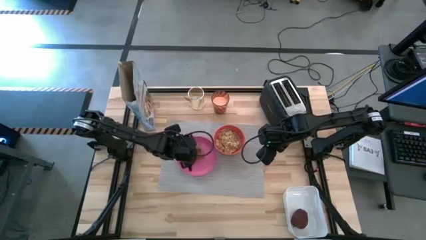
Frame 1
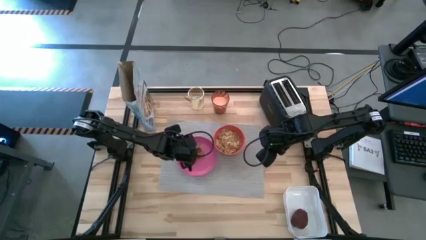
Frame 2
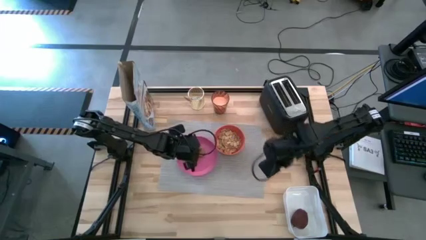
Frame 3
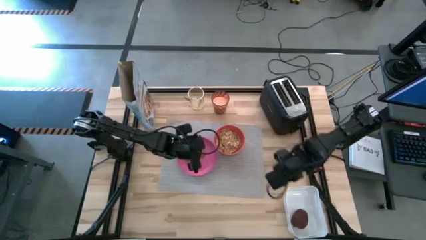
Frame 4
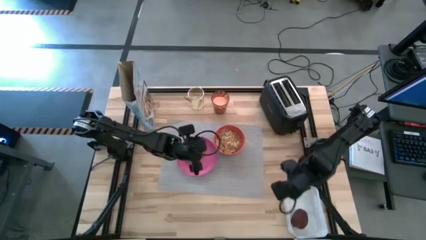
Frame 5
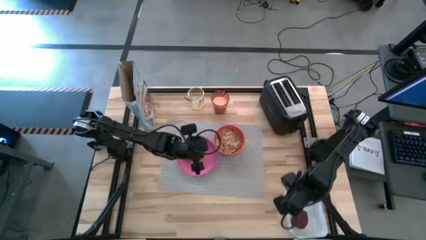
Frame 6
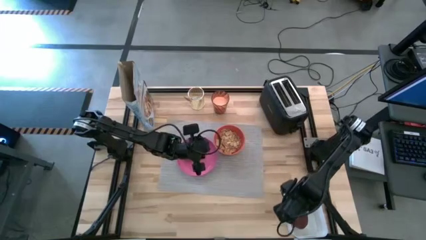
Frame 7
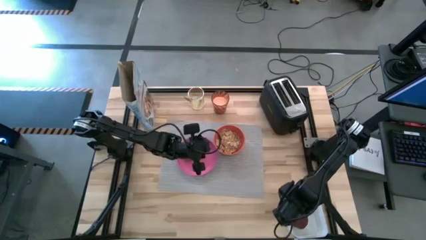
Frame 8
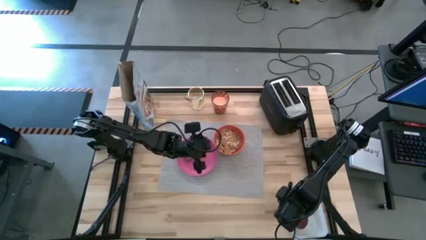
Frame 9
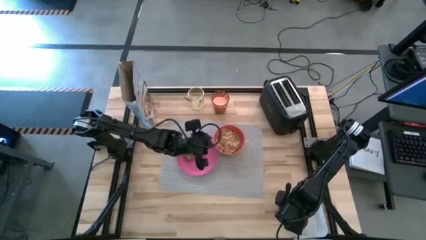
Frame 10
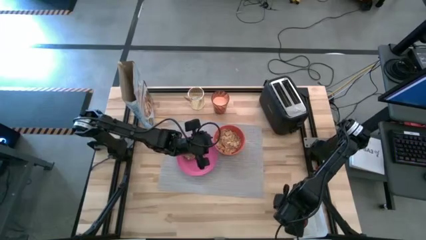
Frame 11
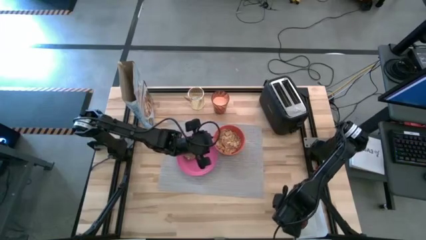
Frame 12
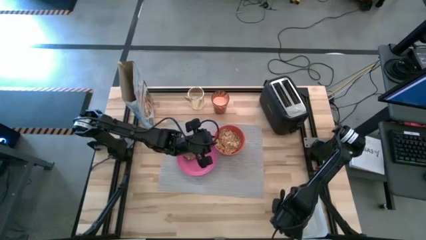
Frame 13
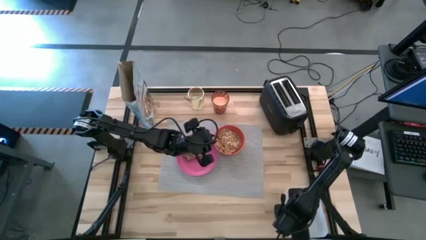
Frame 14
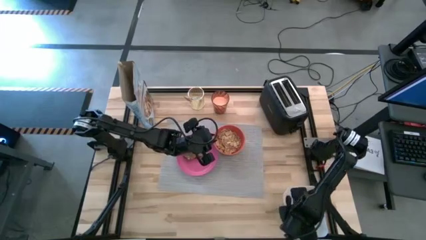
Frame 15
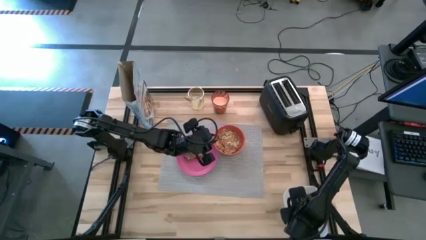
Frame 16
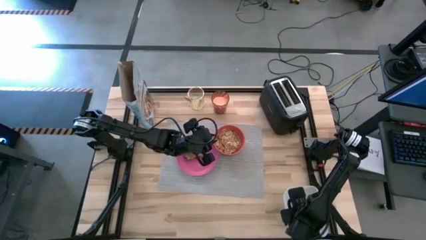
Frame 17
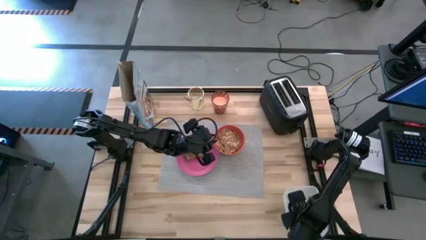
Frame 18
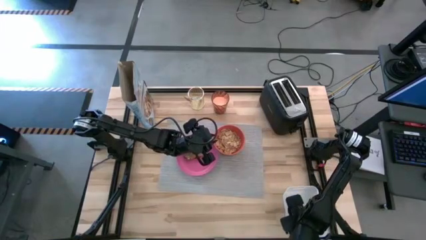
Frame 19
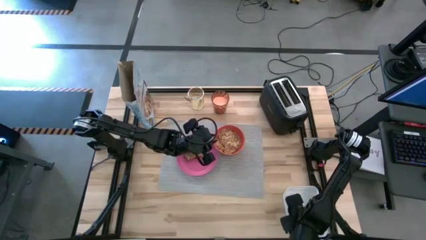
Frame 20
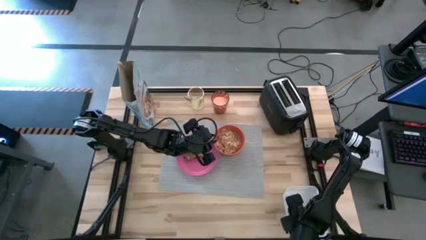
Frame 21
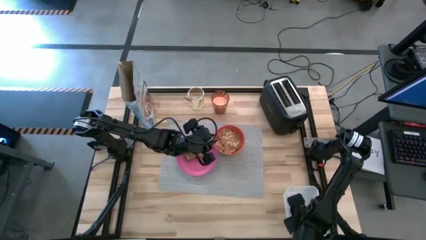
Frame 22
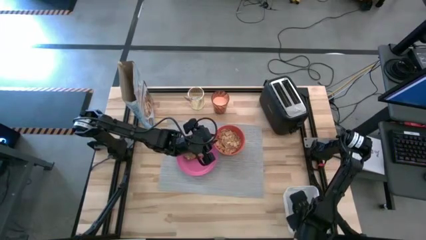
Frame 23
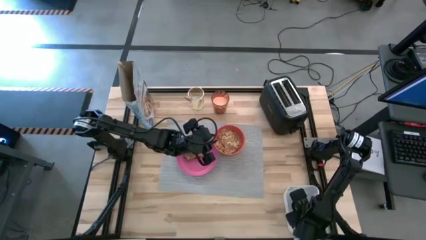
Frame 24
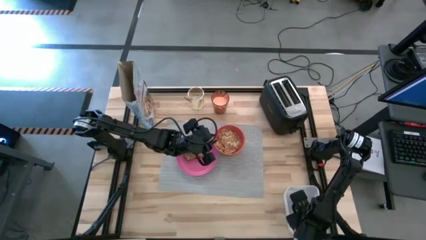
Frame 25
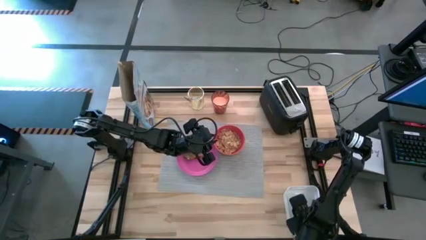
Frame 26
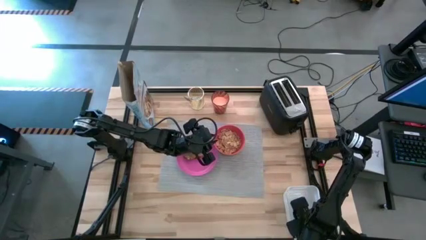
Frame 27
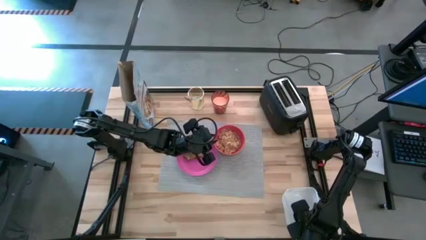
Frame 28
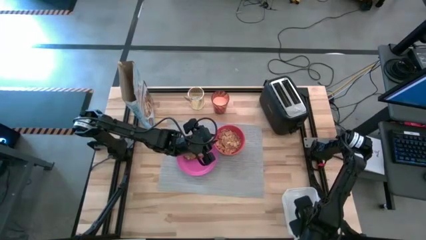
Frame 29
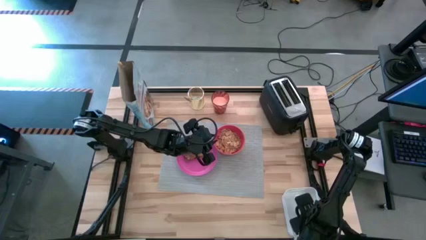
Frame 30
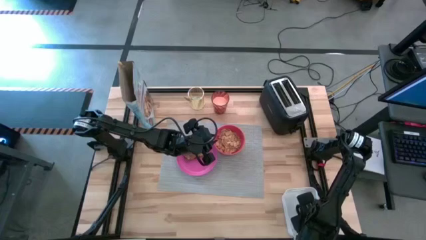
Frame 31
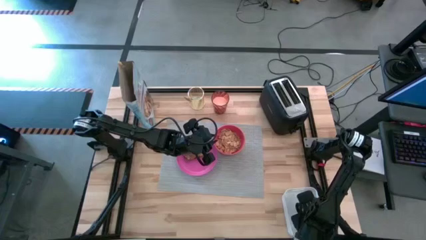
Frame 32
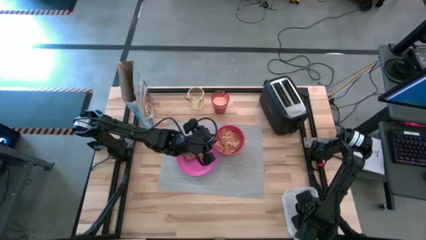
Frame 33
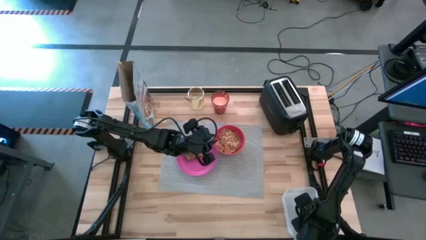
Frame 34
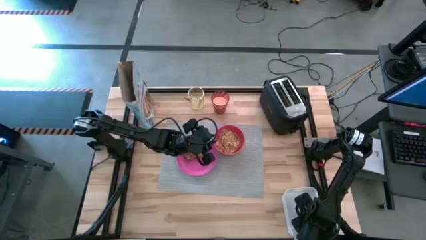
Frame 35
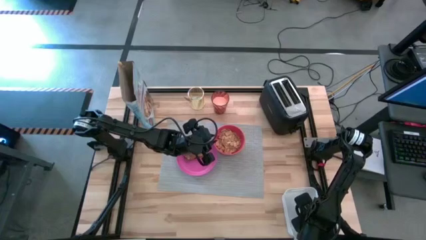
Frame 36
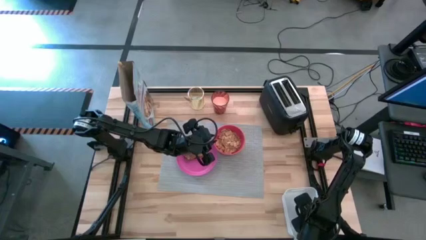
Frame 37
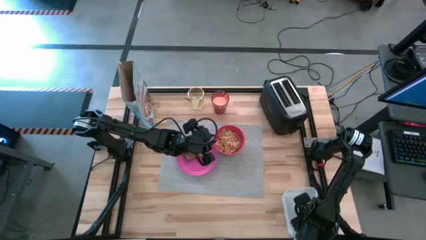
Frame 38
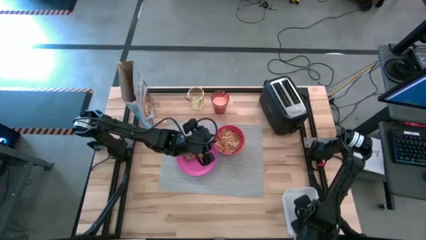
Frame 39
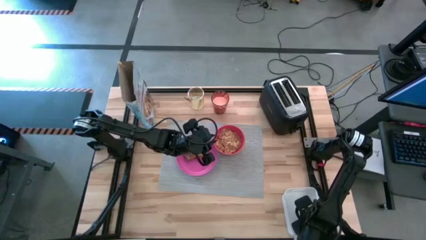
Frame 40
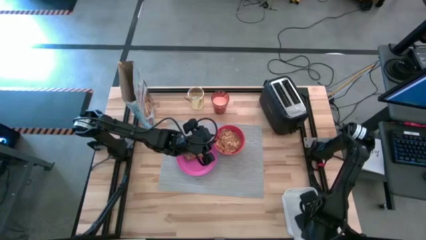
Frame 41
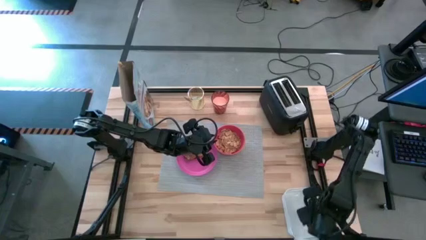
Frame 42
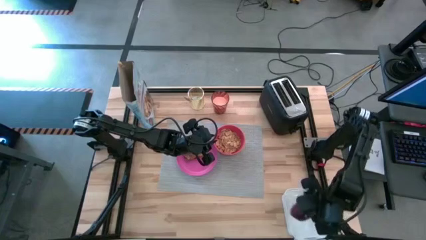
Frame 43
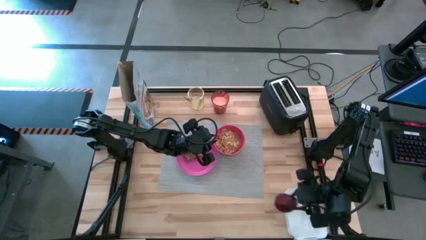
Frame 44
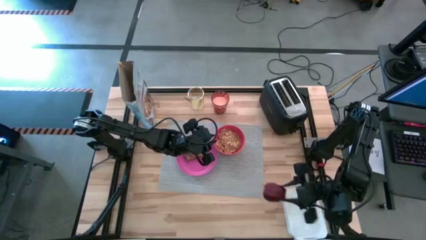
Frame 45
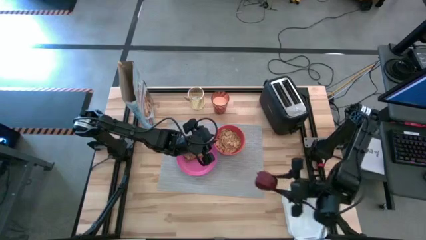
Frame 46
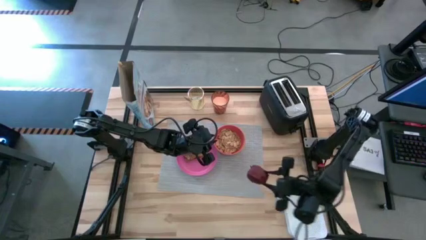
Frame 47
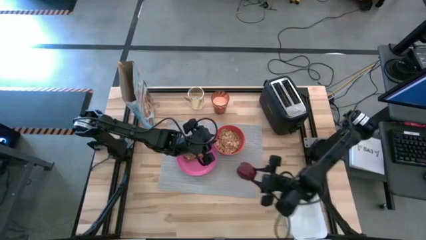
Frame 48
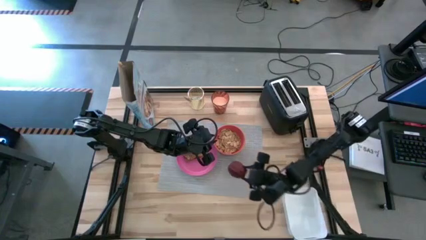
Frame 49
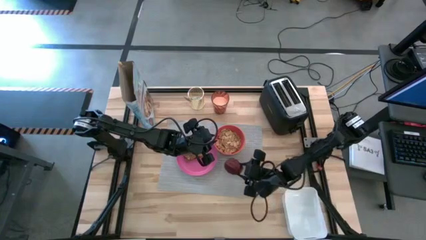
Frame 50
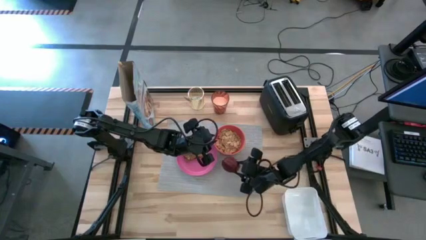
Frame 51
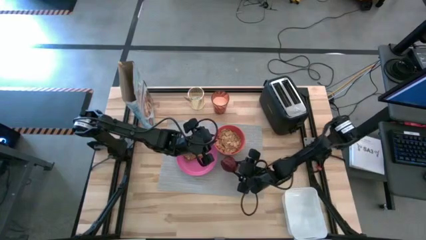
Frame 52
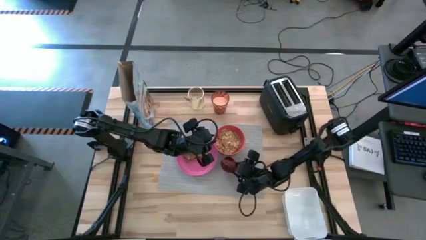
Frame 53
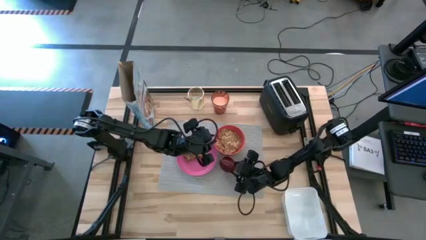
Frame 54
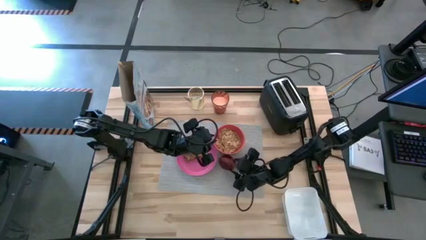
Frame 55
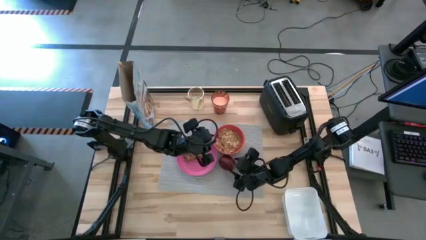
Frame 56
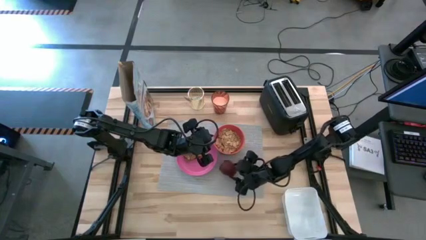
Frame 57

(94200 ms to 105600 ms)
Task: Arrange a breakfast setting
Put the apple on the gray placemat to the bottom right of the pink plate and red bowl
